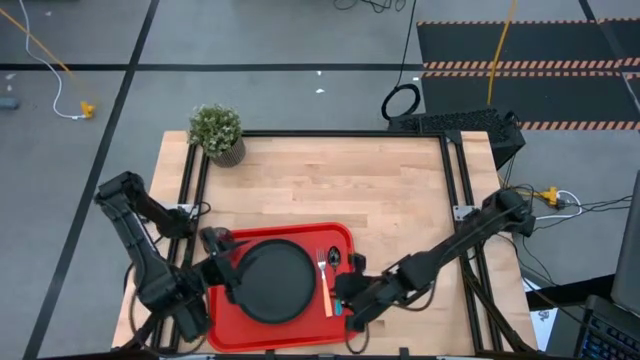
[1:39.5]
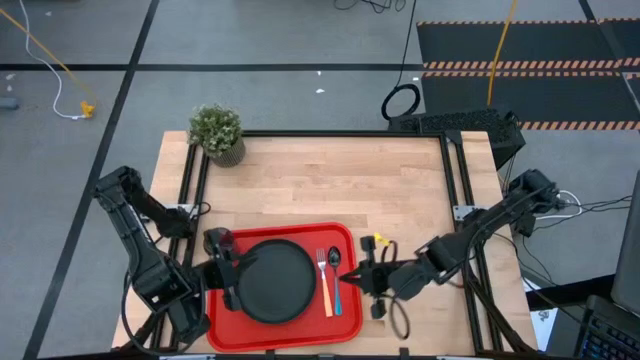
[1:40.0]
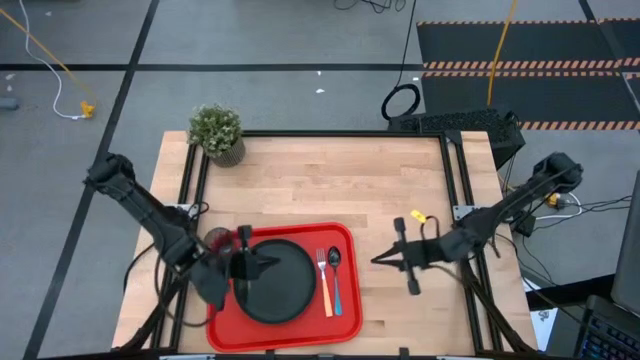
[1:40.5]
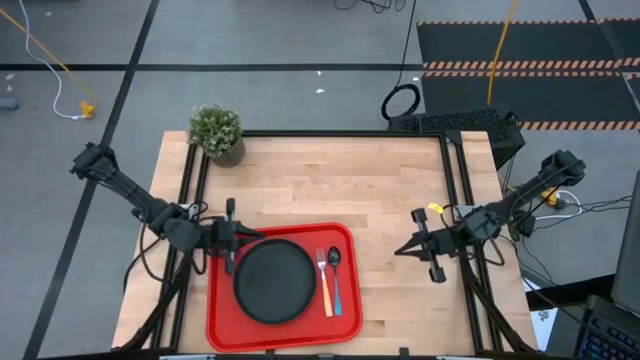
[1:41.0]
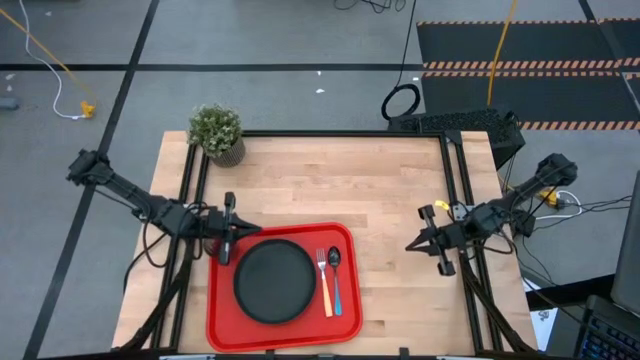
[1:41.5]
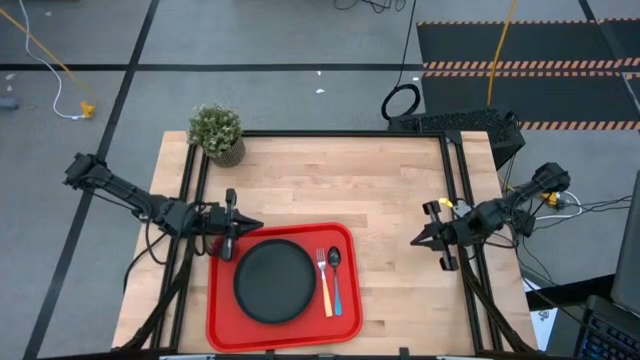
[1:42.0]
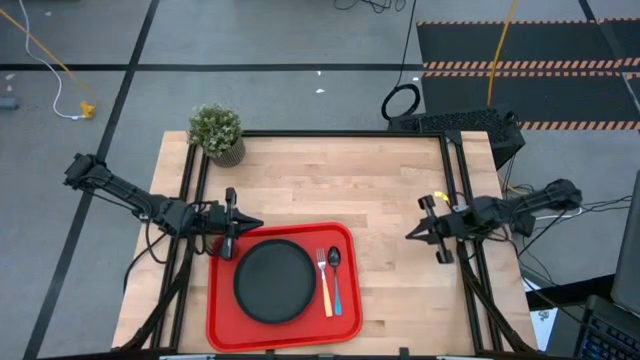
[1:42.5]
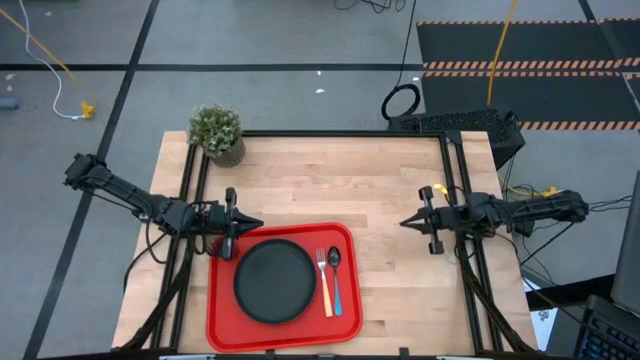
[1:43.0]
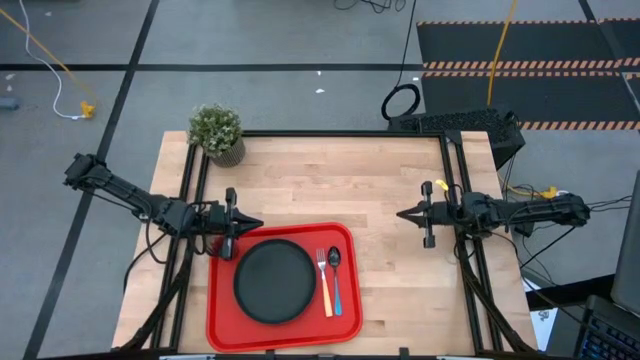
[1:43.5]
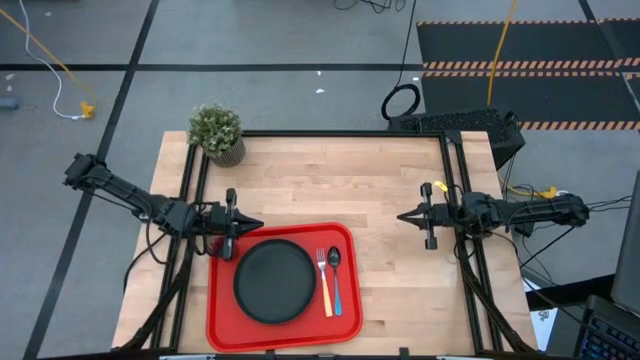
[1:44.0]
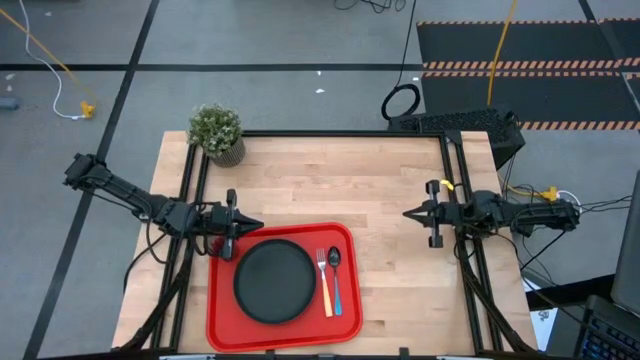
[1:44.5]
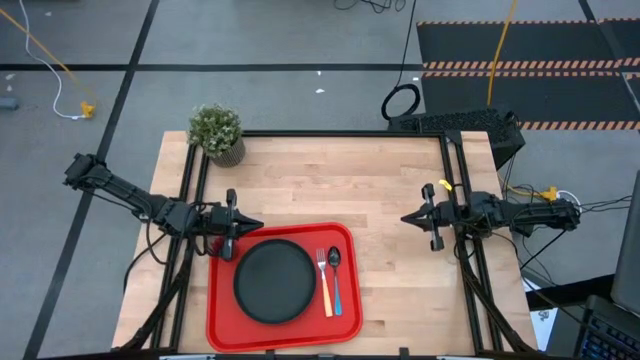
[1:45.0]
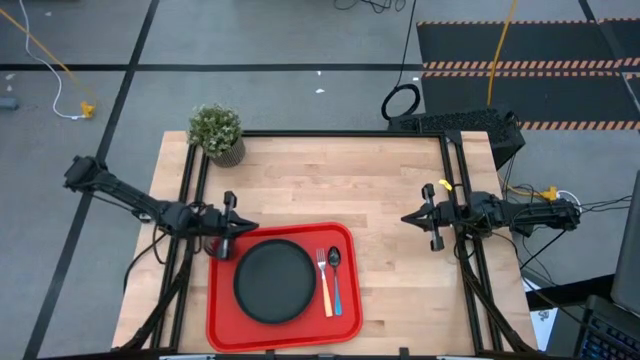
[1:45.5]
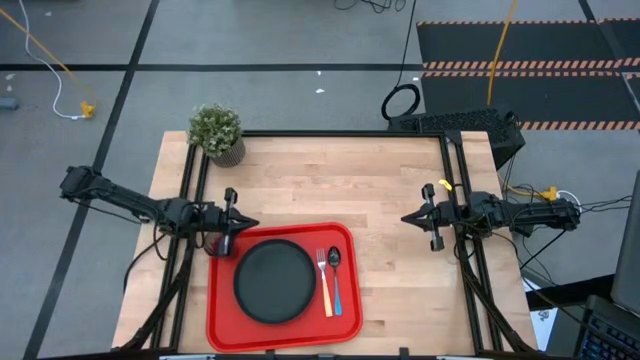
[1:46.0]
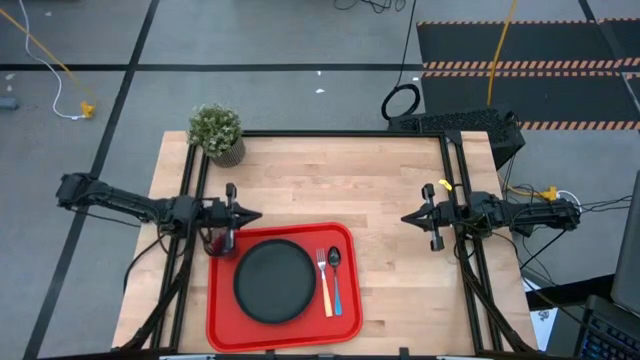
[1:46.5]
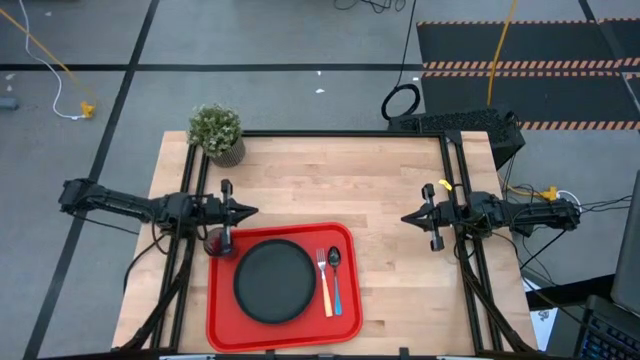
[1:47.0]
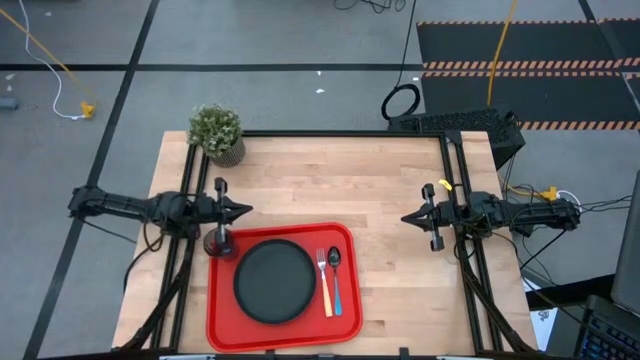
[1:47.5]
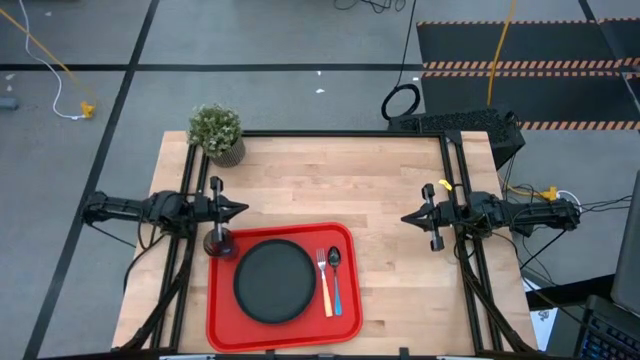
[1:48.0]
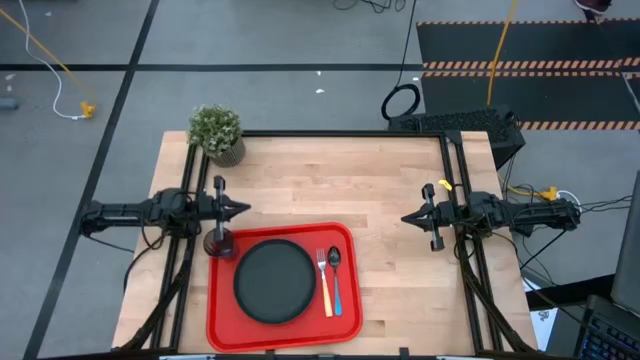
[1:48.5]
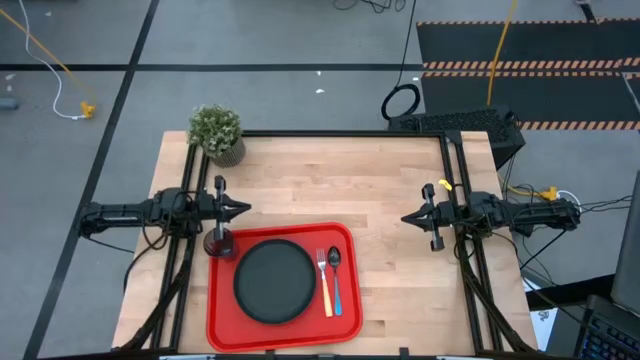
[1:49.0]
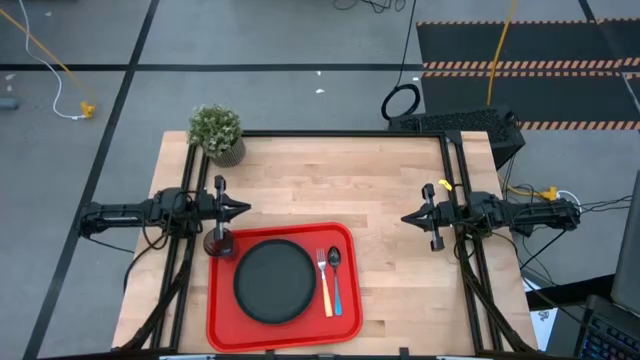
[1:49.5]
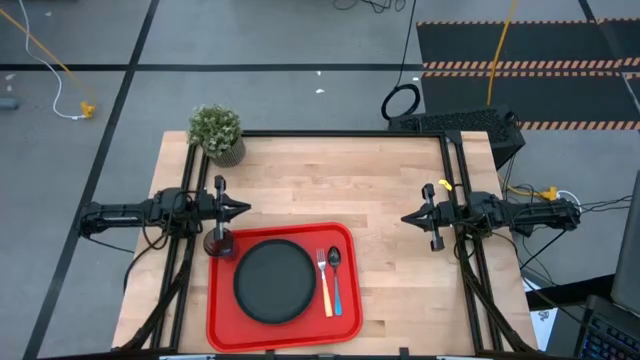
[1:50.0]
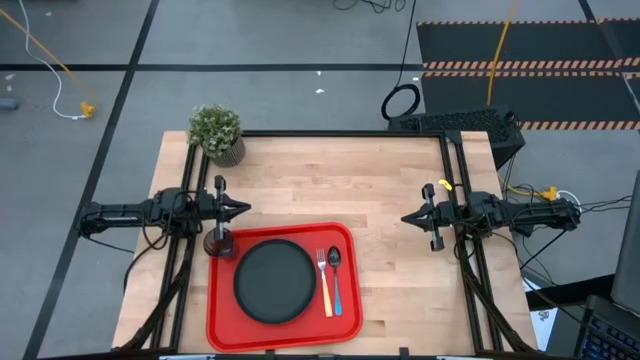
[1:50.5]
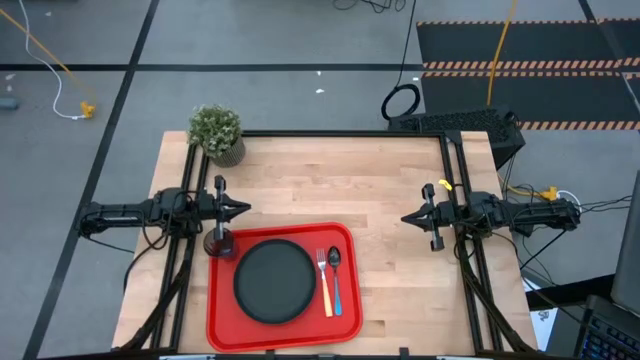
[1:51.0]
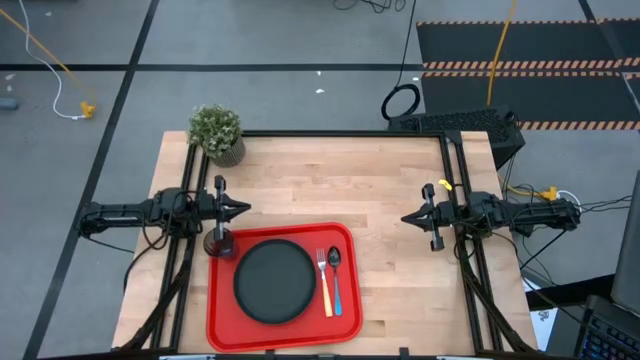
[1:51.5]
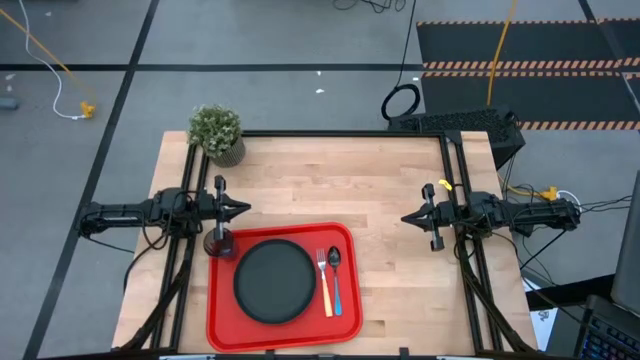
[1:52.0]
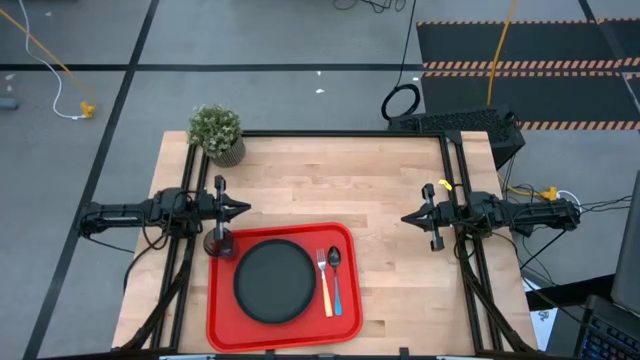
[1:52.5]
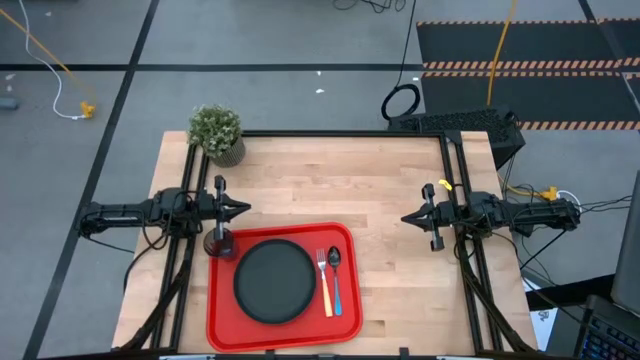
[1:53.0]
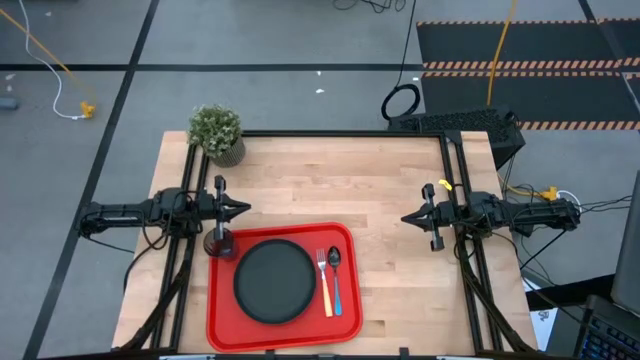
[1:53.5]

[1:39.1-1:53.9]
Task: Pick and place plate/cup/fork/spoon on tray
Return to Home Position

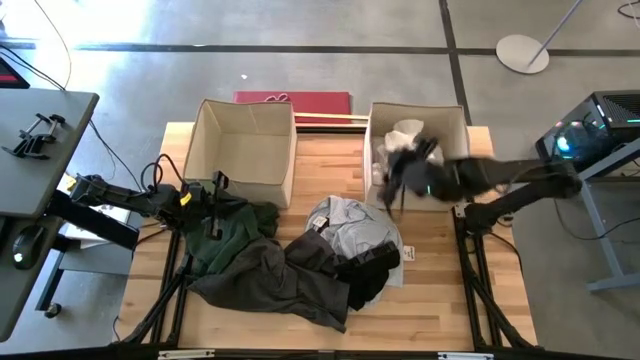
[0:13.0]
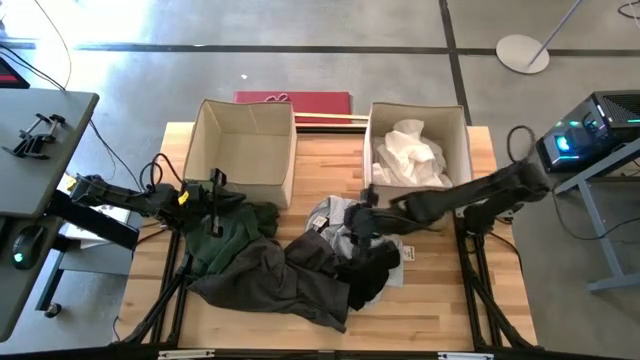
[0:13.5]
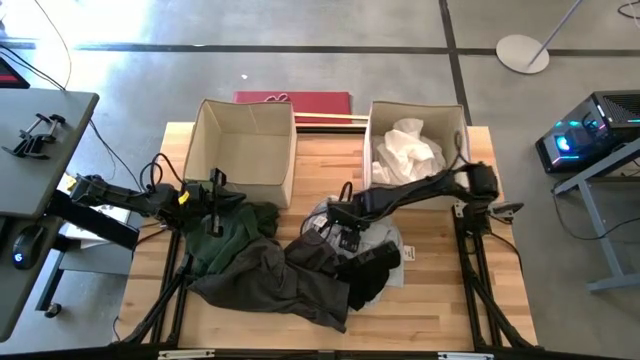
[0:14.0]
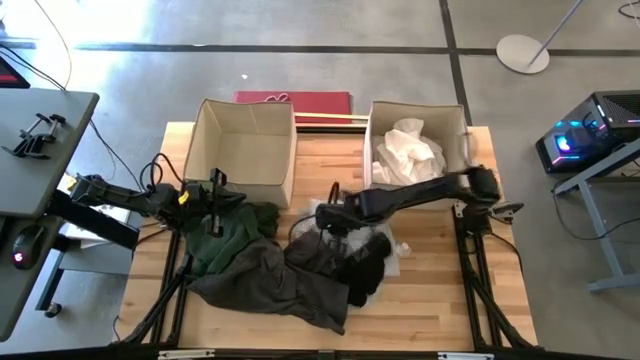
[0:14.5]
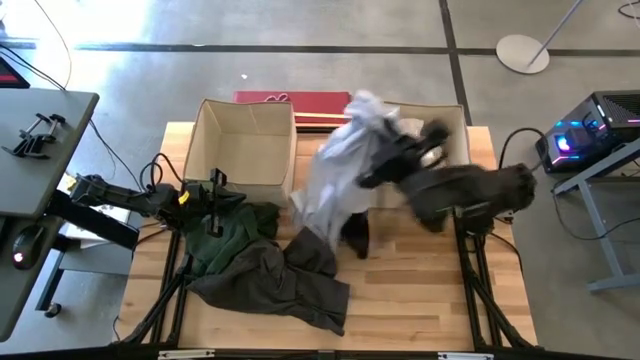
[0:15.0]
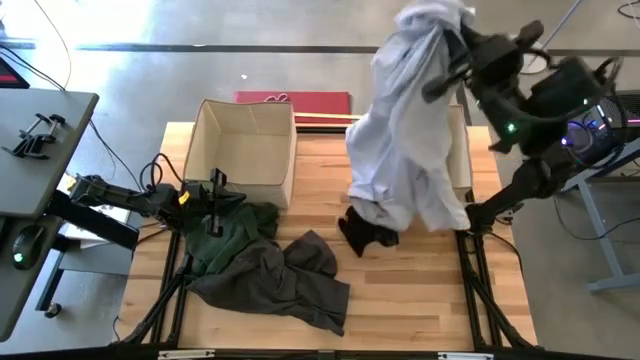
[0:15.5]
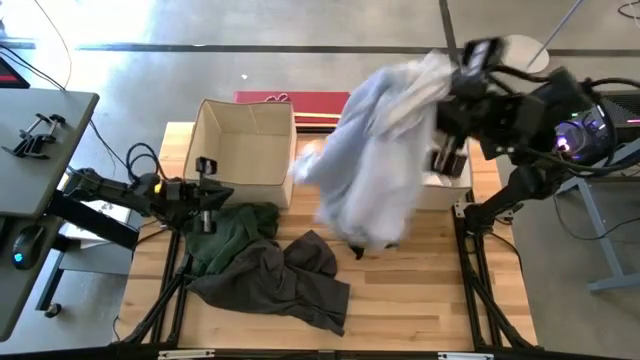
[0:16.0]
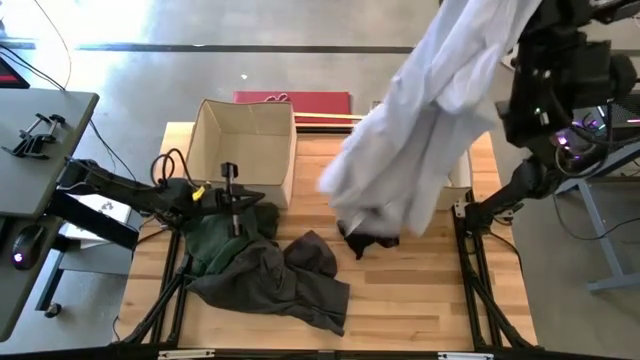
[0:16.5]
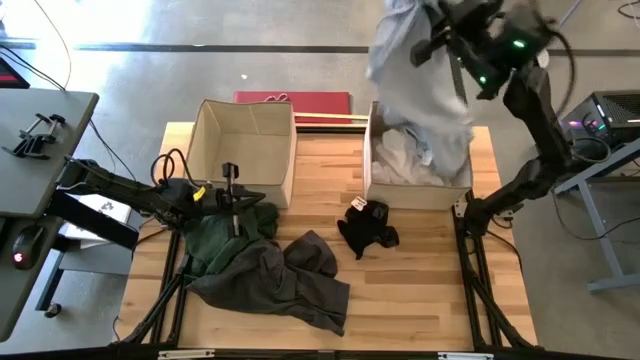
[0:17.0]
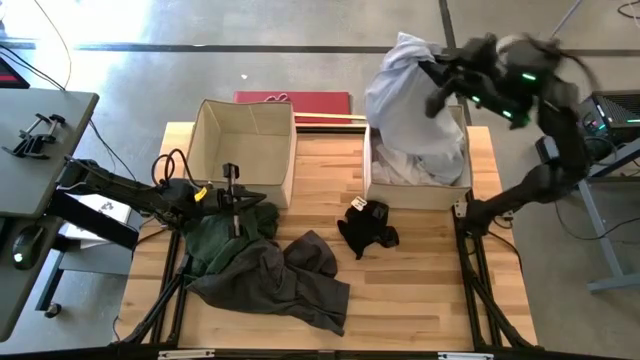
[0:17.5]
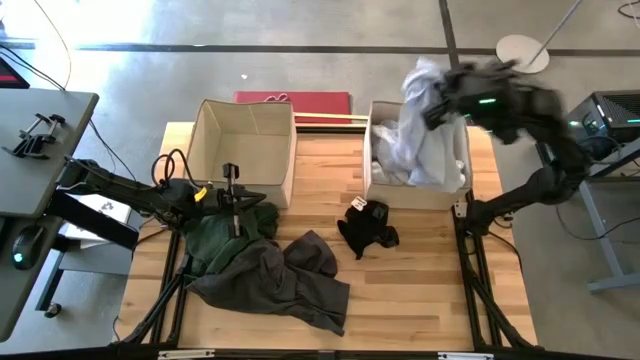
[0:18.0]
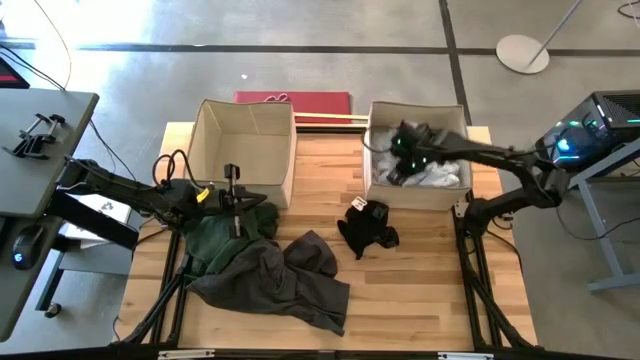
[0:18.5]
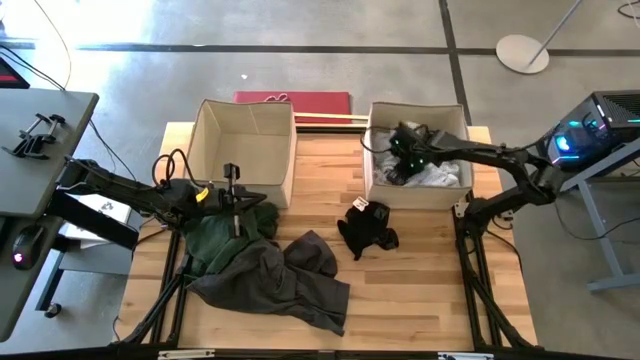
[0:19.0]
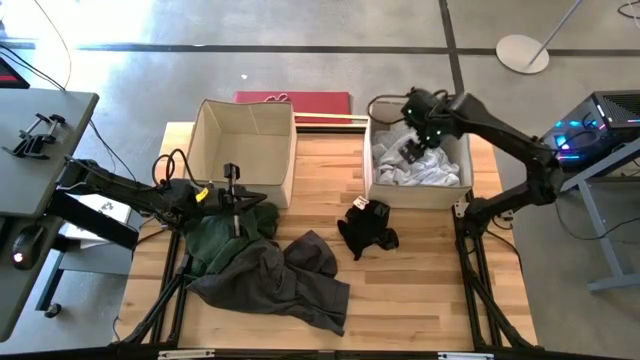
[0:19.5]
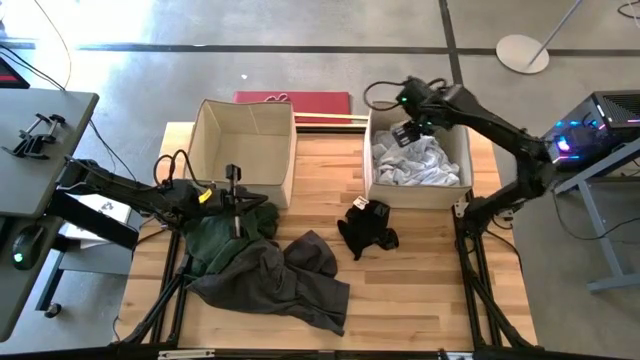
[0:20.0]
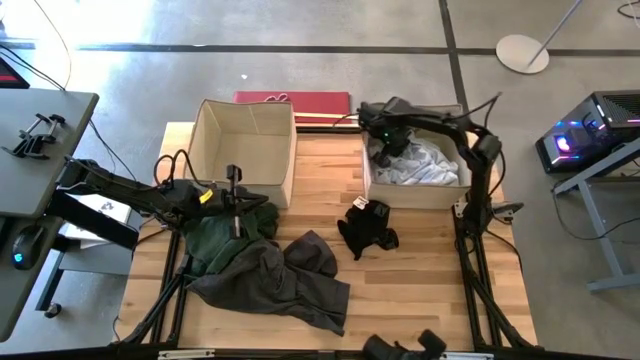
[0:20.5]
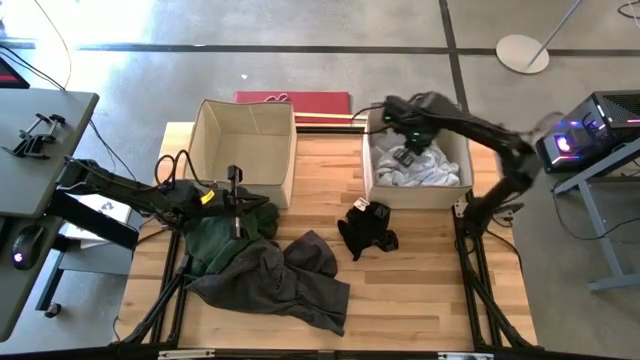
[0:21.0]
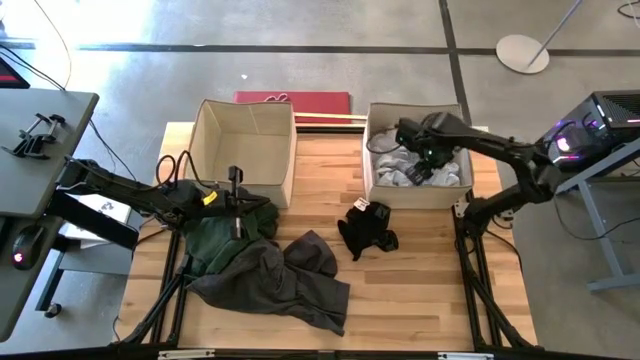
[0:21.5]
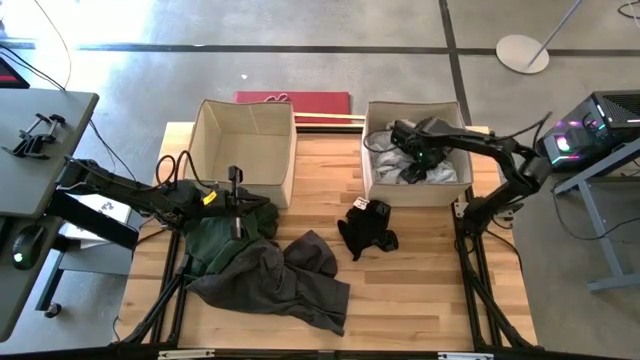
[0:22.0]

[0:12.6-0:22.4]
Task: Sort clothes
Put the blue and white shirt into the right brown laundry bin
